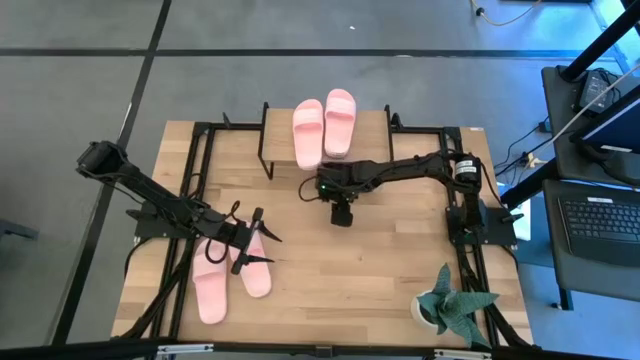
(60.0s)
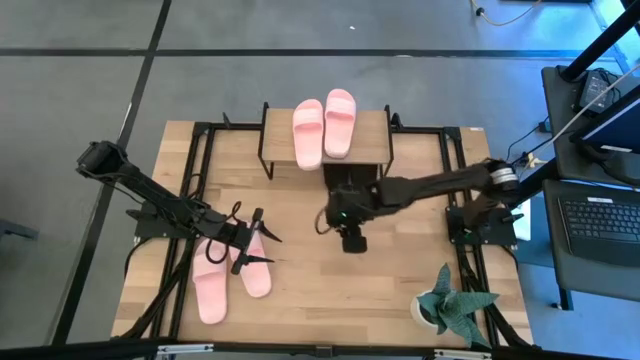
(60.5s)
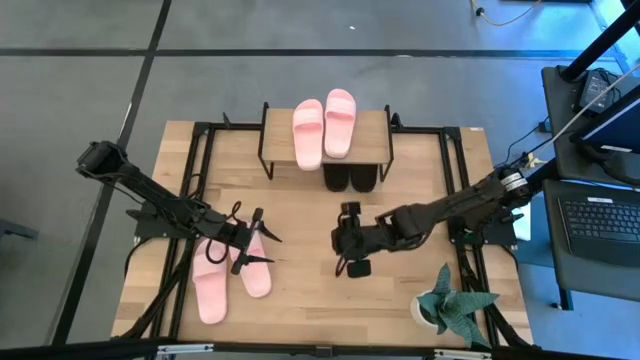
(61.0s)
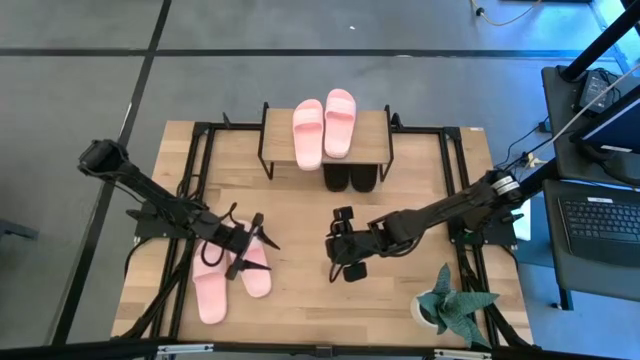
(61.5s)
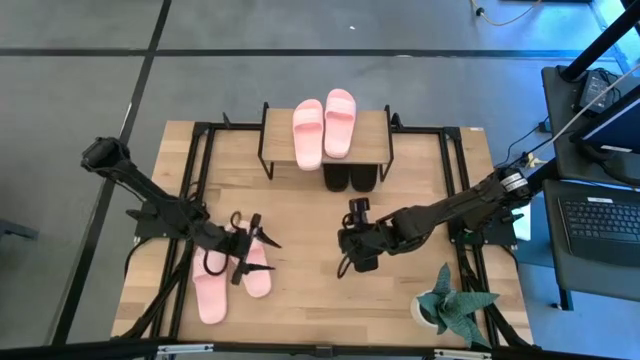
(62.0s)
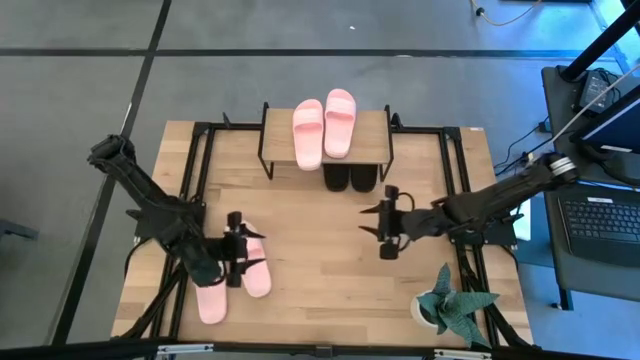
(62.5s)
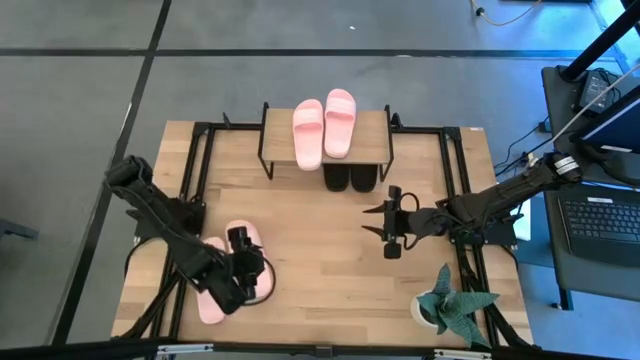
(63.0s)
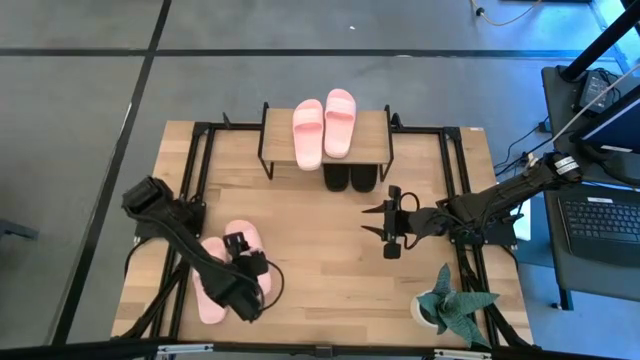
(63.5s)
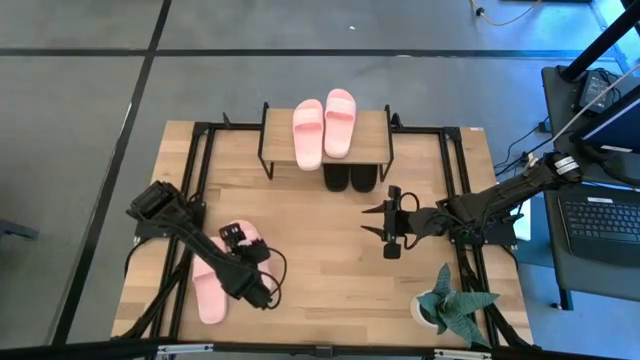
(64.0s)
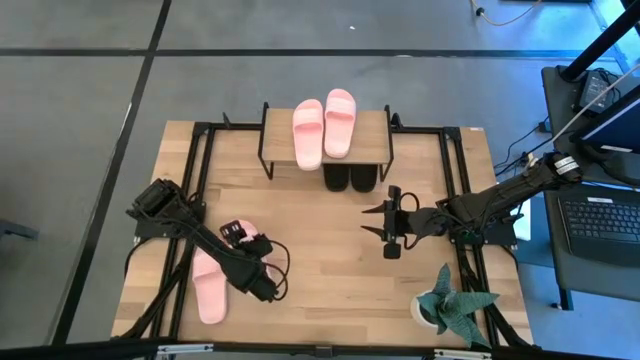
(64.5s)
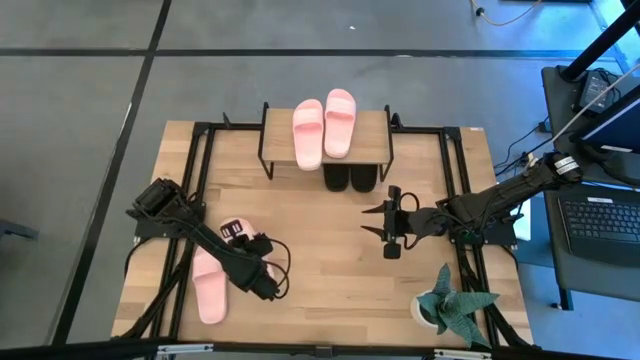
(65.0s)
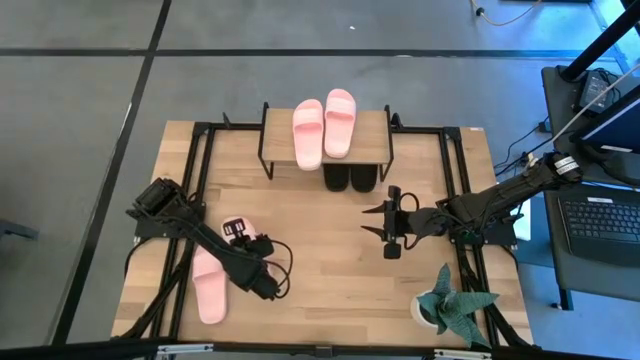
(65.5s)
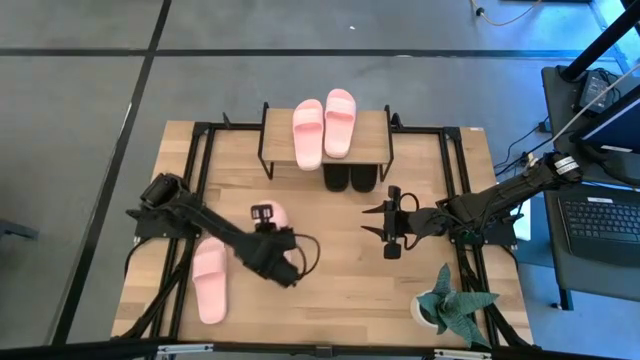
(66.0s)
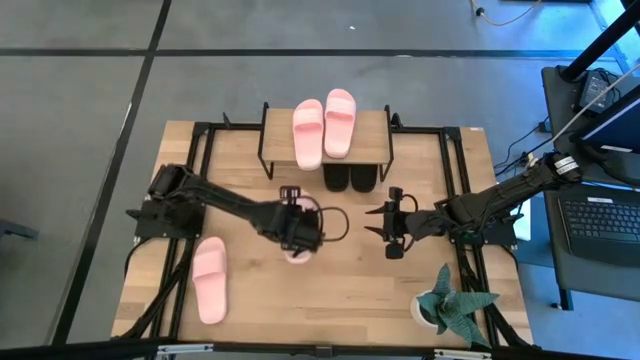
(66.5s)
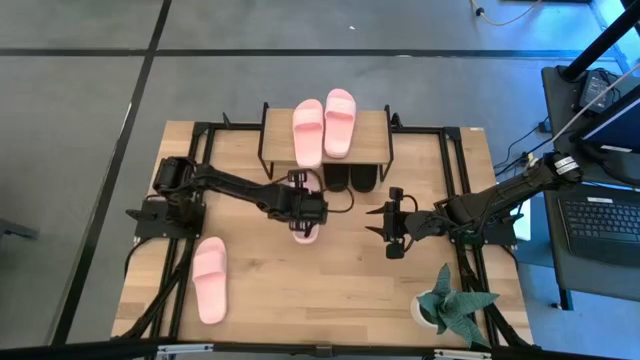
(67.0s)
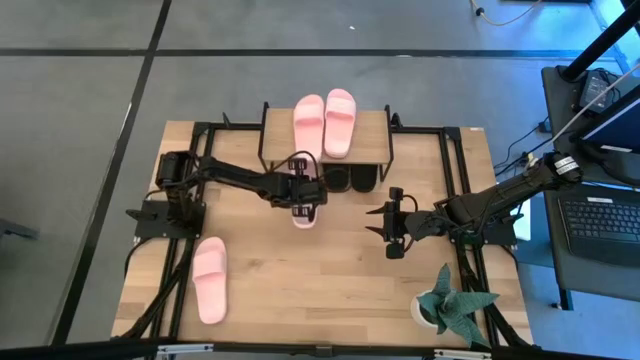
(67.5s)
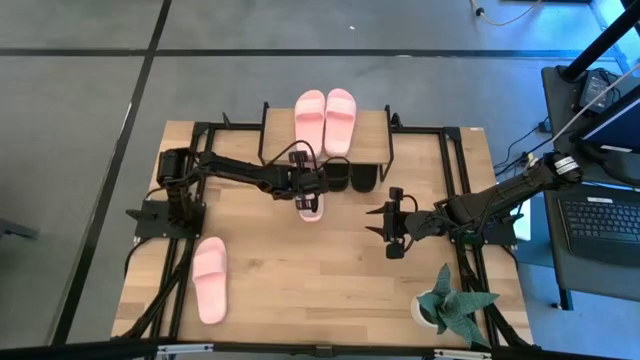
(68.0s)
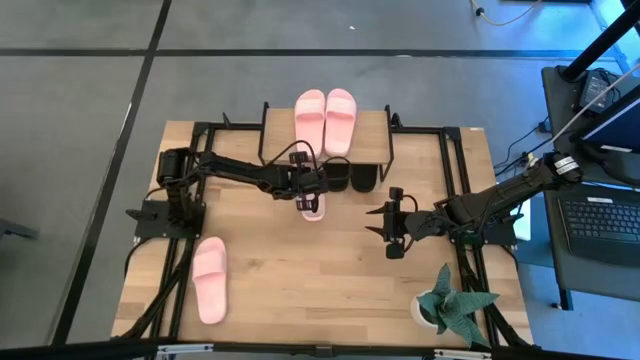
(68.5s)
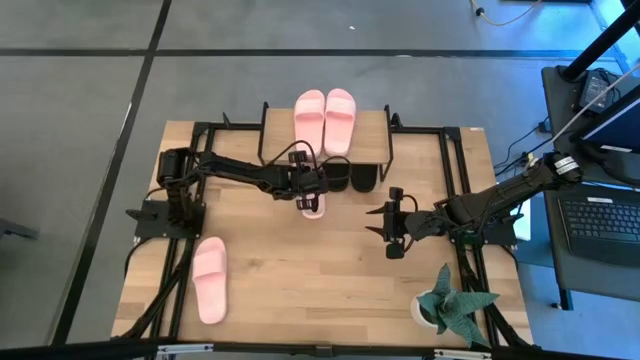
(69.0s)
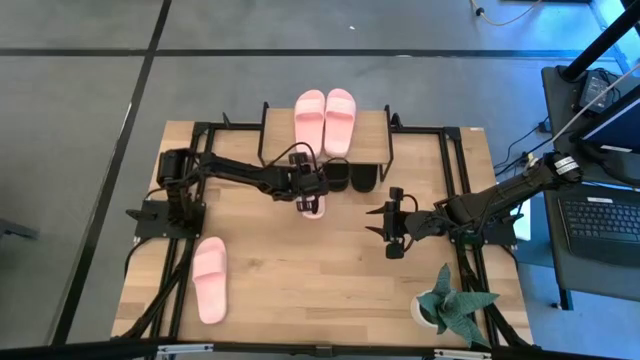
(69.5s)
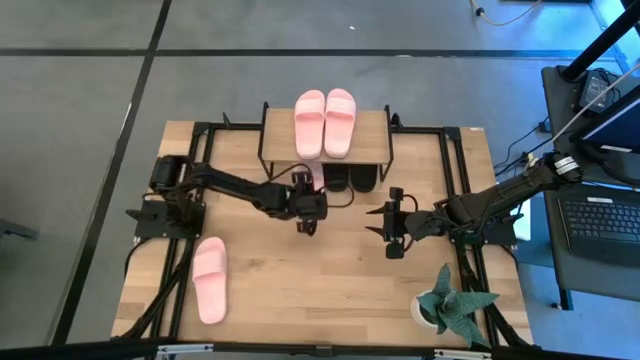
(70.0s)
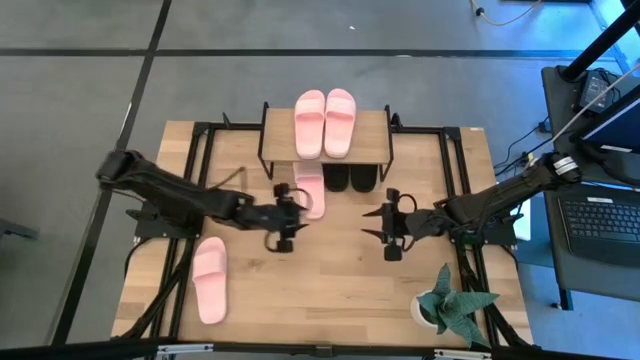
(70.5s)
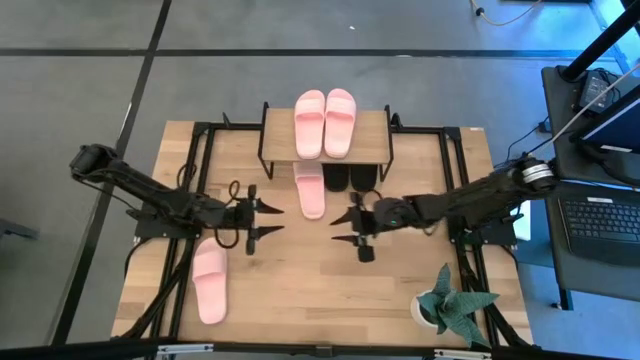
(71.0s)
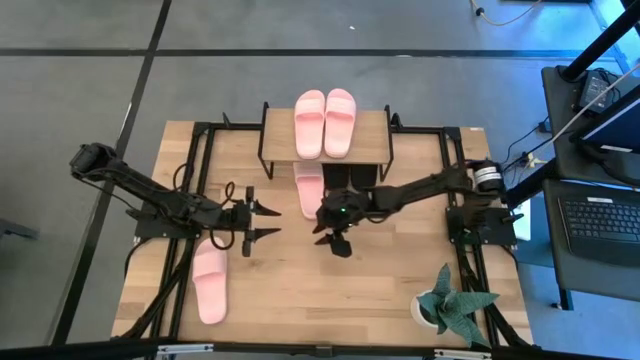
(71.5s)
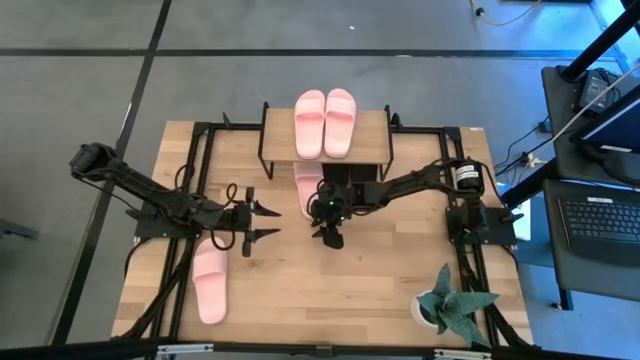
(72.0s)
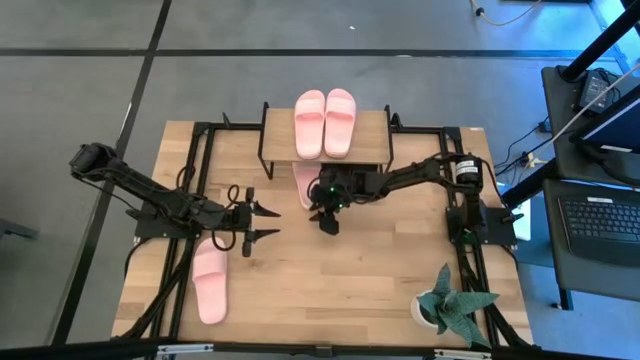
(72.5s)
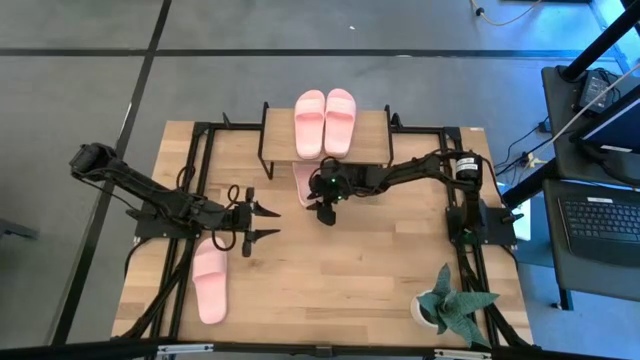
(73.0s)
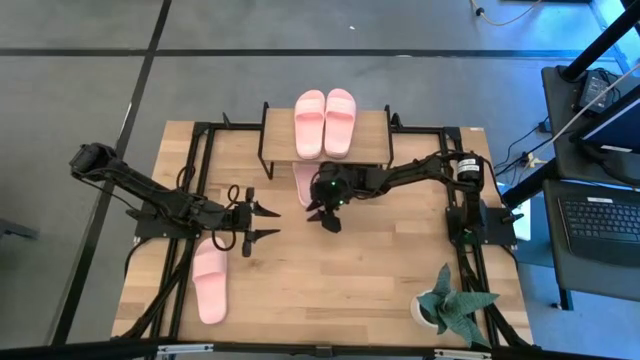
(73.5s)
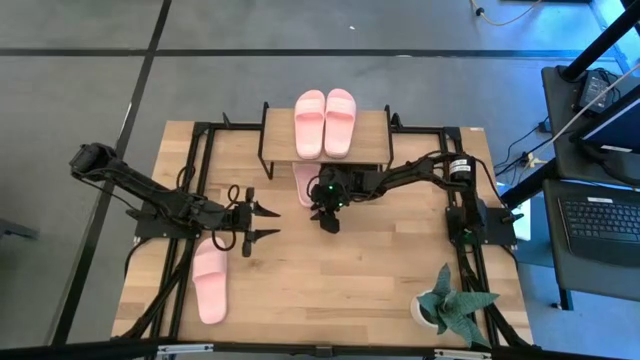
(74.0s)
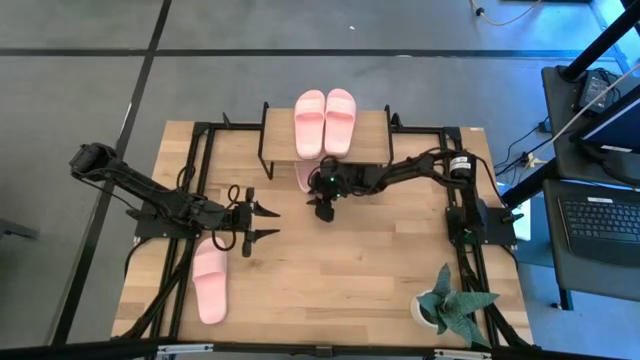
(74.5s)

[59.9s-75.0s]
Task: Pick and place slides into the shelf
Put the pink slipper slide under the shelf

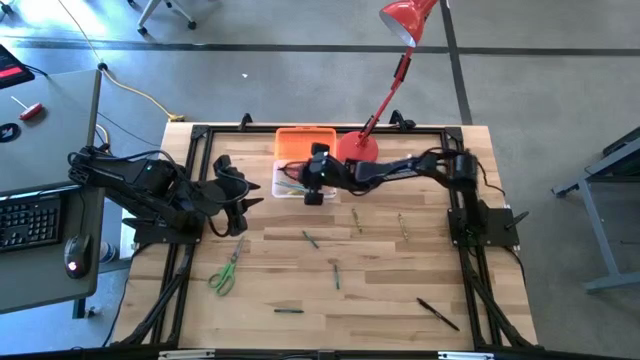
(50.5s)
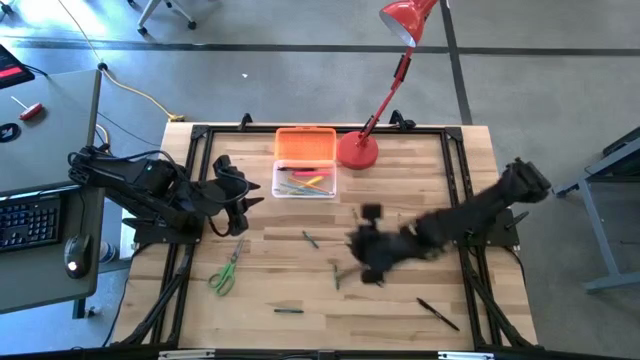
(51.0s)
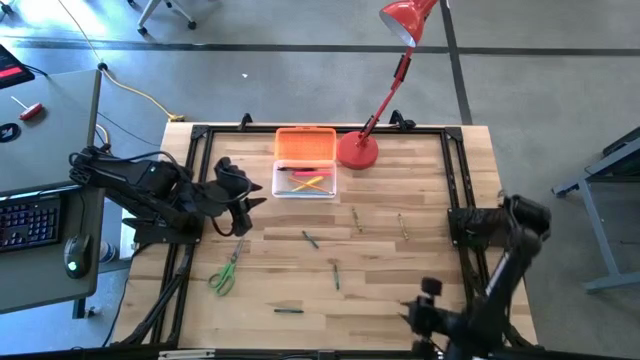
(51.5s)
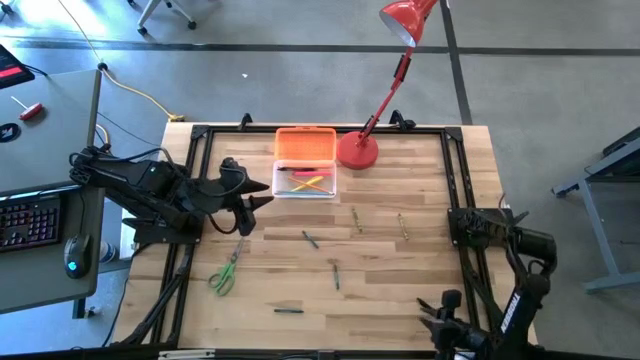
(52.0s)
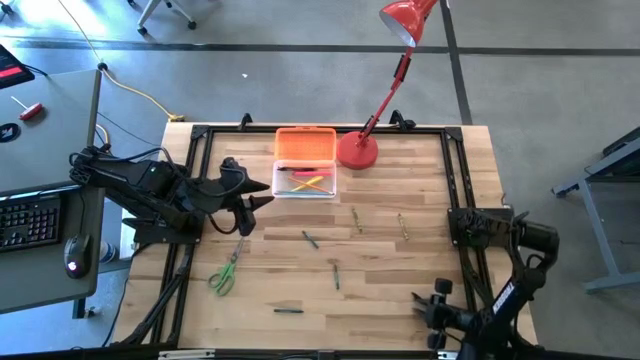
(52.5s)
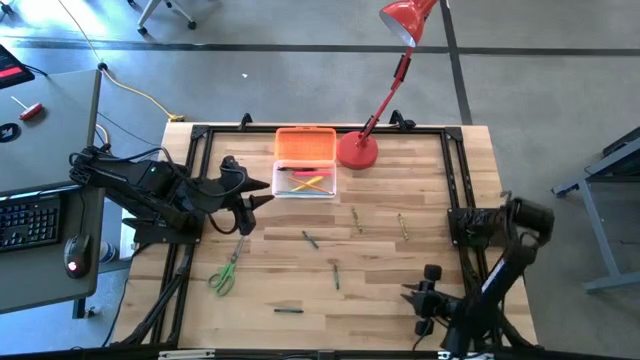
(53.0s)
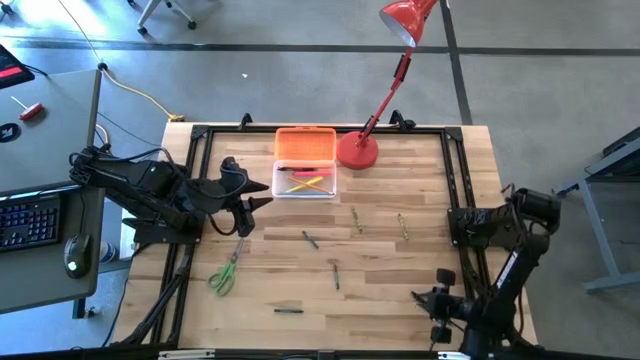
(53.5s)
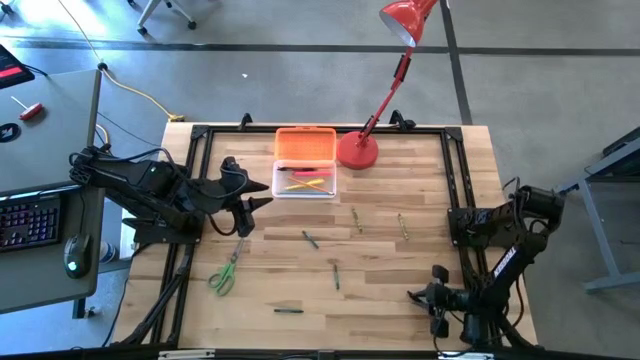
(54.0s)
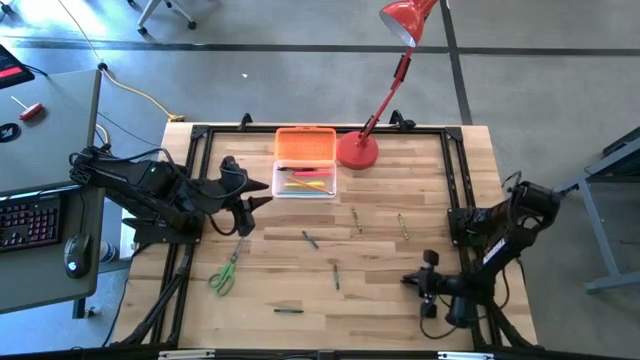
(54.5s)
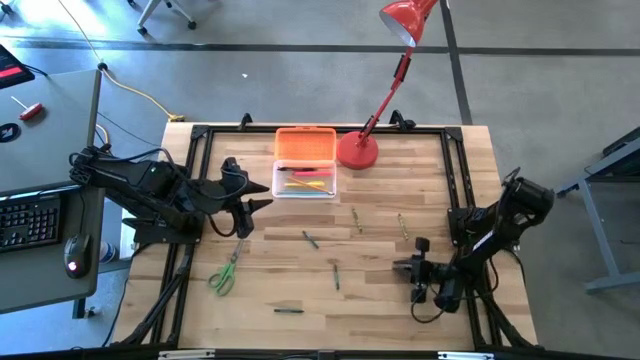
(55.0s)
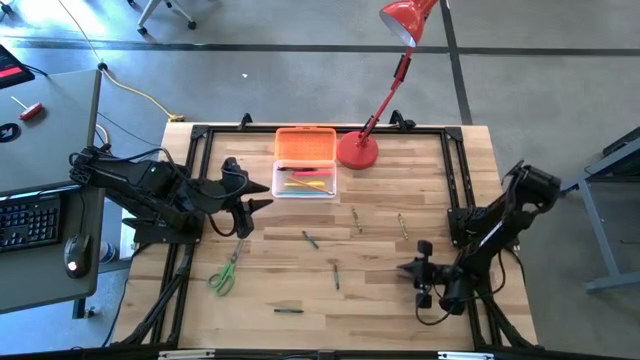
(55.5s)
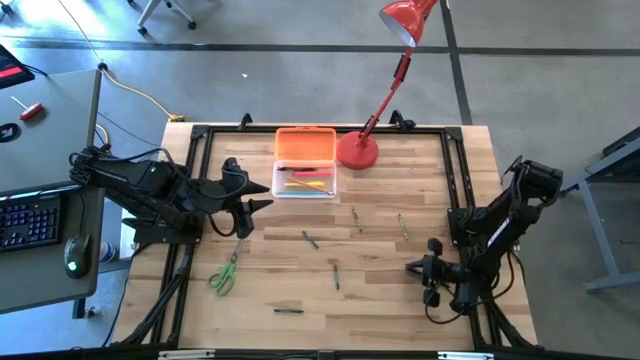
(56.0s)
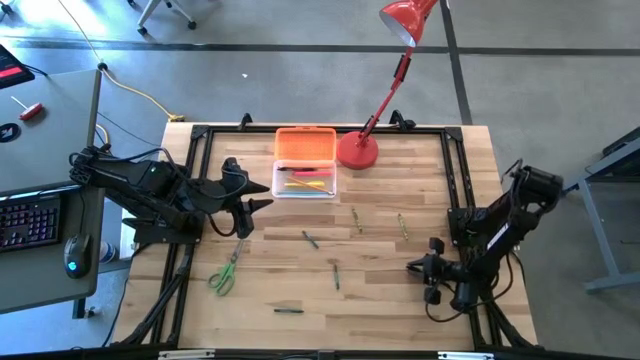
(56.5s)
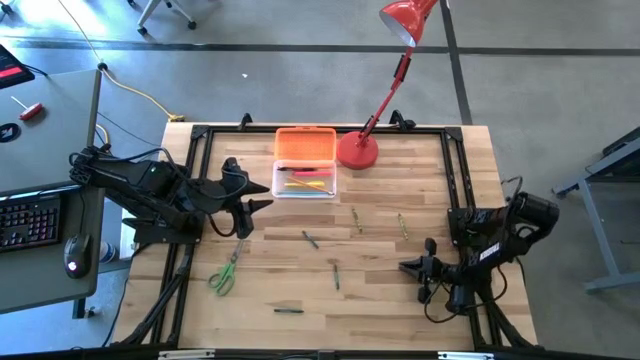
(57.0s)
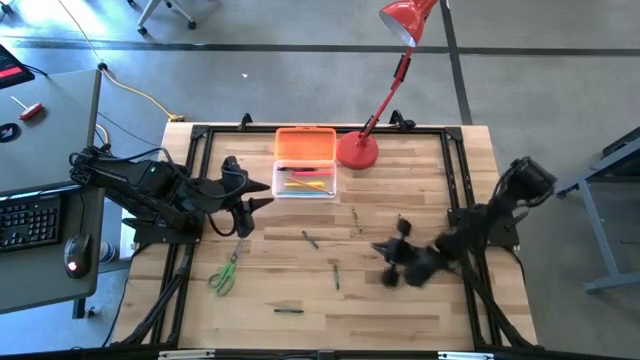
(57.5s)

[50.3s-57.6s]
Task: Pick & place school supplies into a supply box
Put the black pen into the orange supply box
